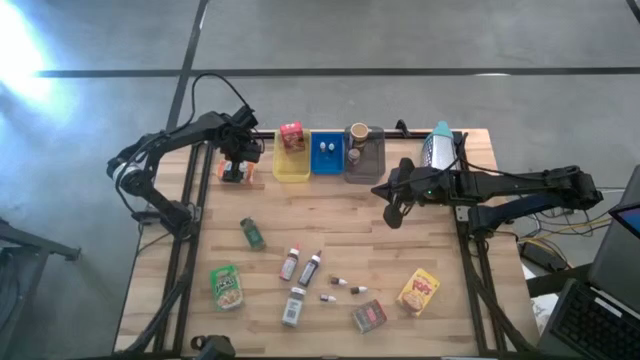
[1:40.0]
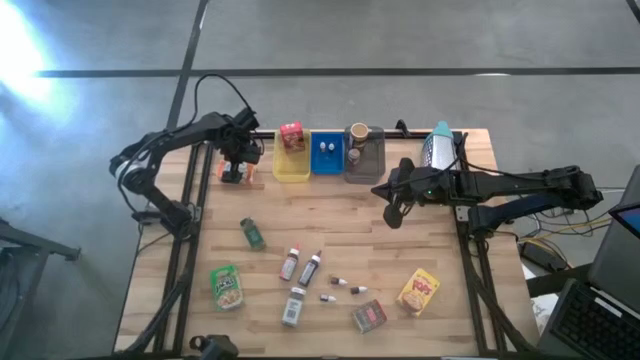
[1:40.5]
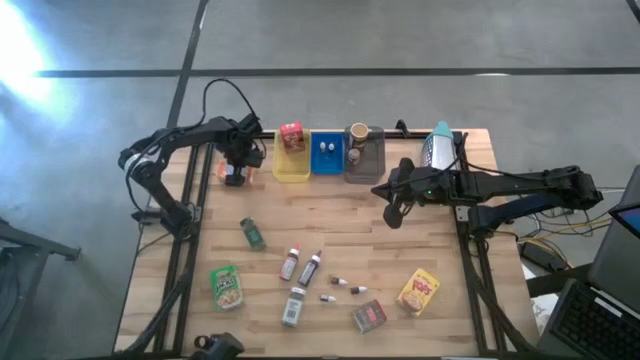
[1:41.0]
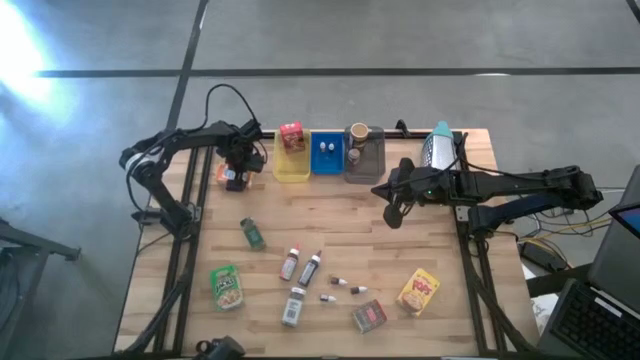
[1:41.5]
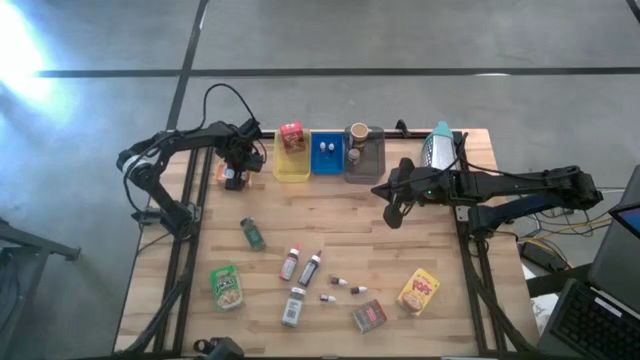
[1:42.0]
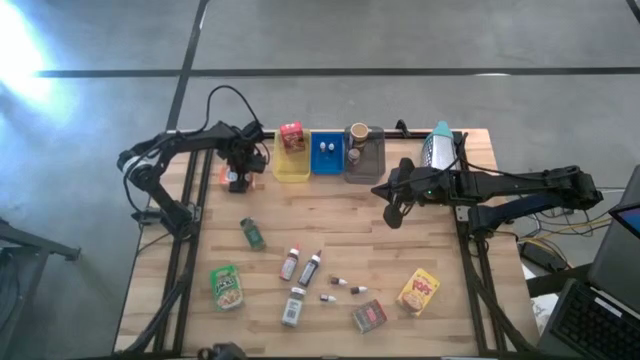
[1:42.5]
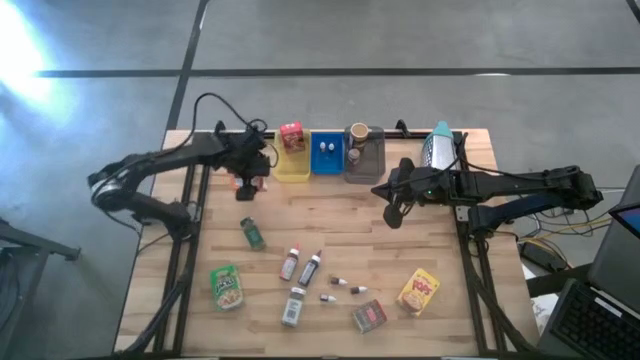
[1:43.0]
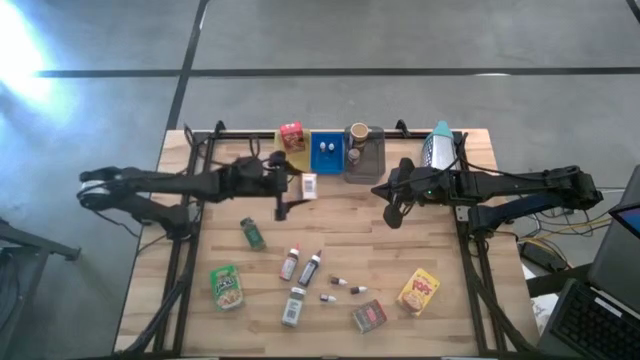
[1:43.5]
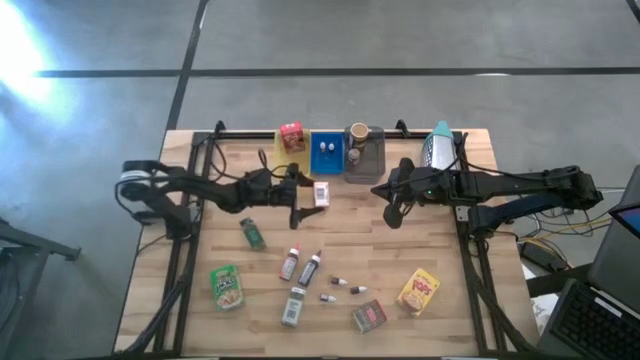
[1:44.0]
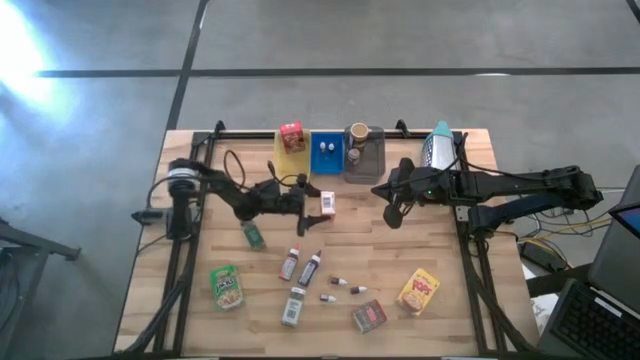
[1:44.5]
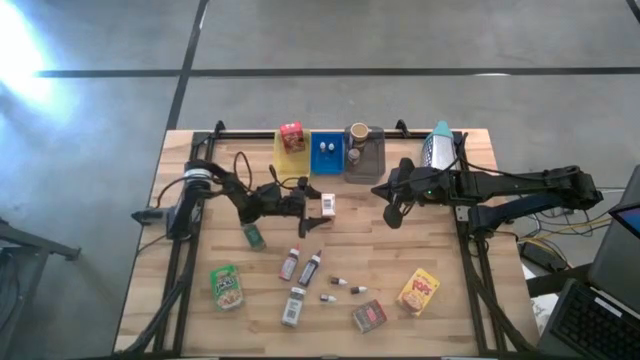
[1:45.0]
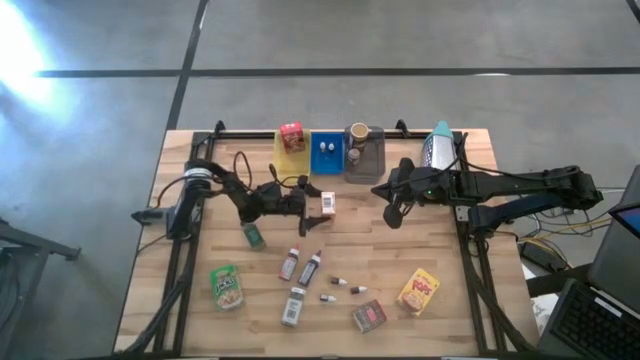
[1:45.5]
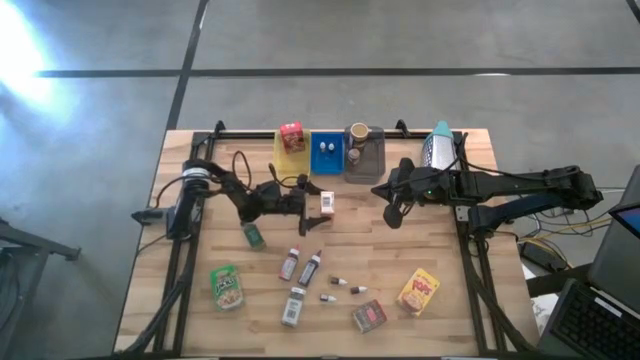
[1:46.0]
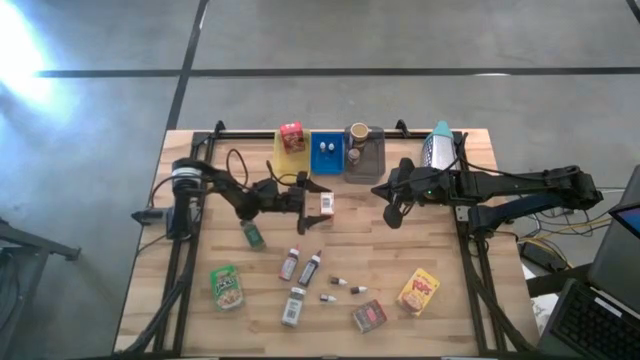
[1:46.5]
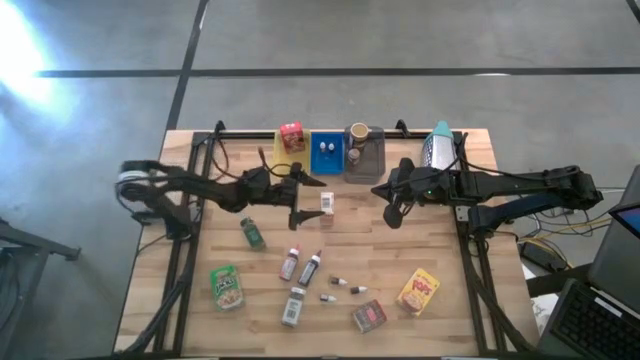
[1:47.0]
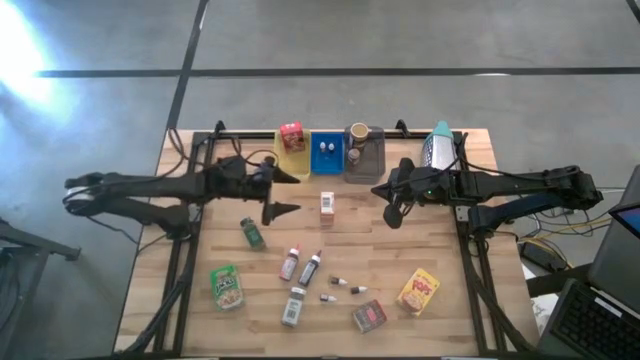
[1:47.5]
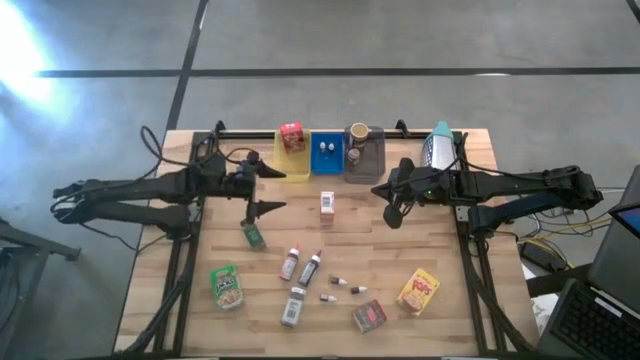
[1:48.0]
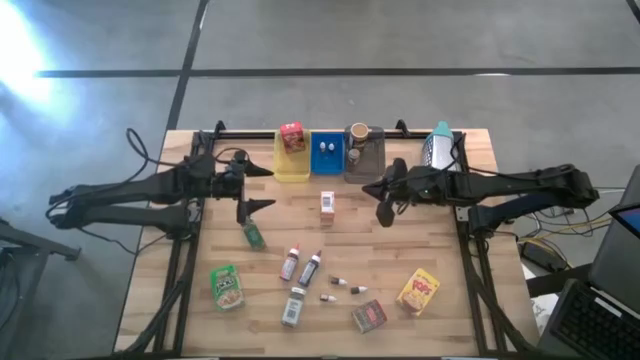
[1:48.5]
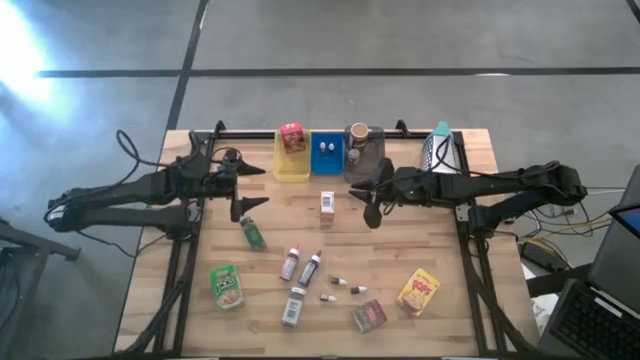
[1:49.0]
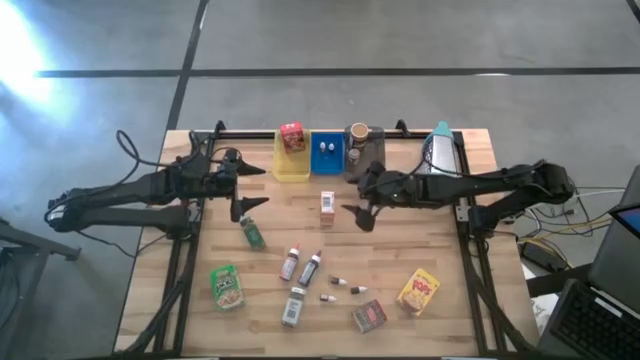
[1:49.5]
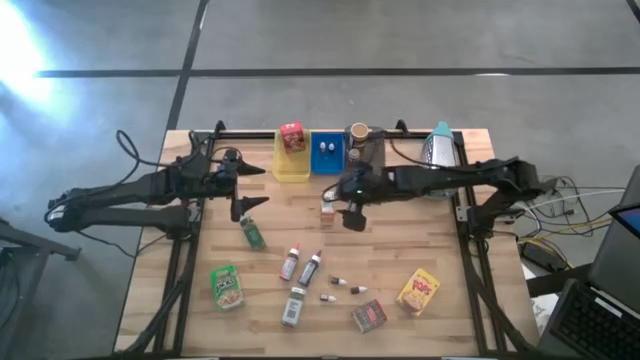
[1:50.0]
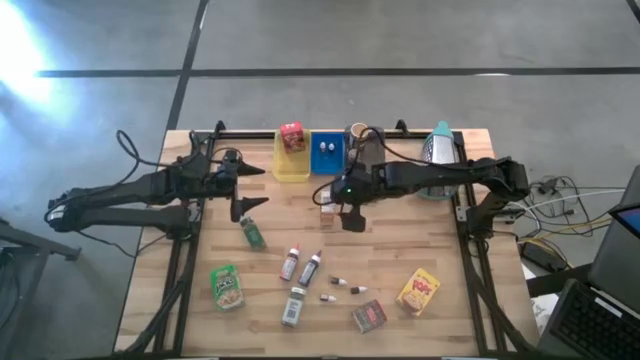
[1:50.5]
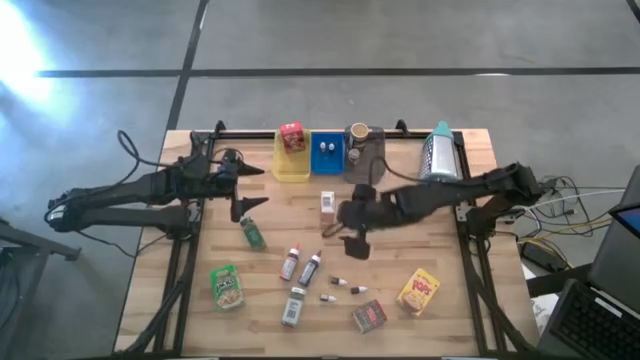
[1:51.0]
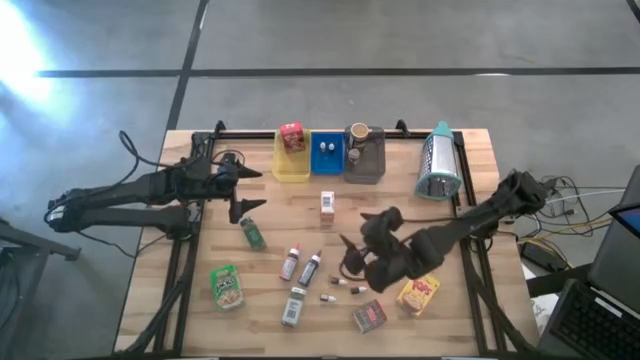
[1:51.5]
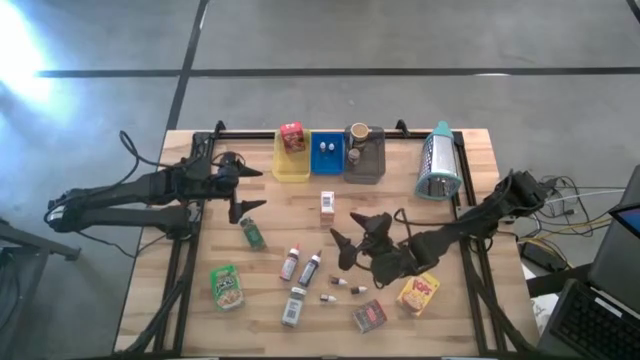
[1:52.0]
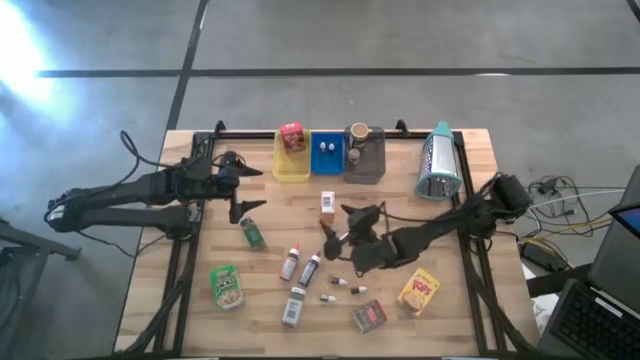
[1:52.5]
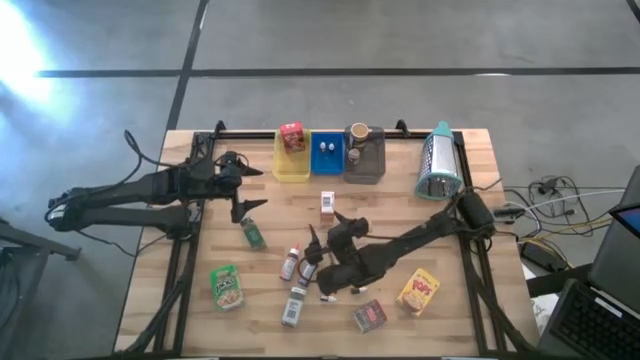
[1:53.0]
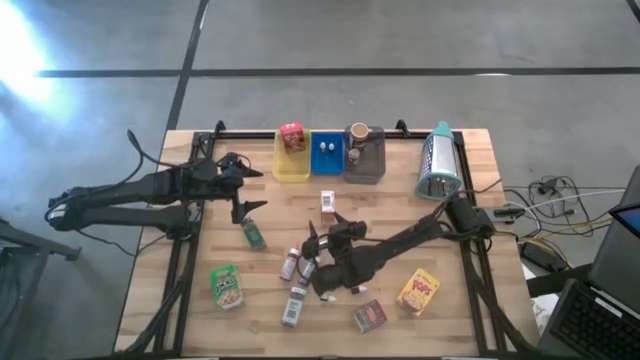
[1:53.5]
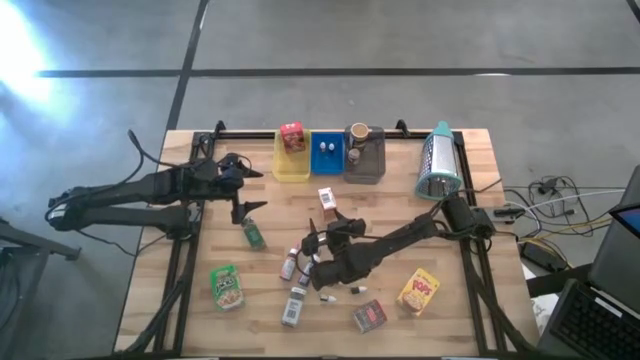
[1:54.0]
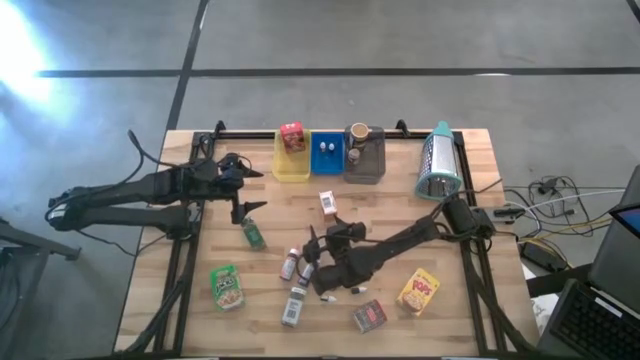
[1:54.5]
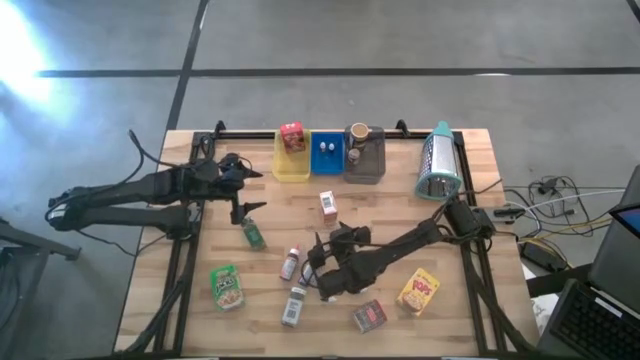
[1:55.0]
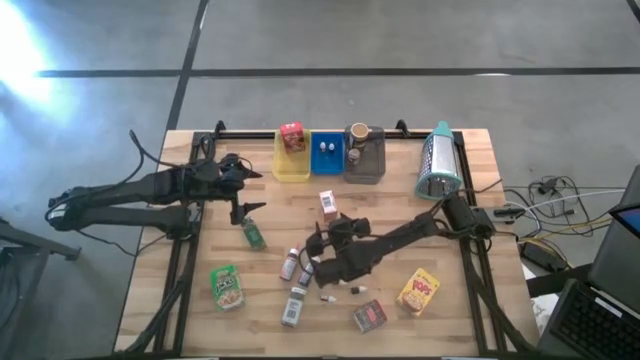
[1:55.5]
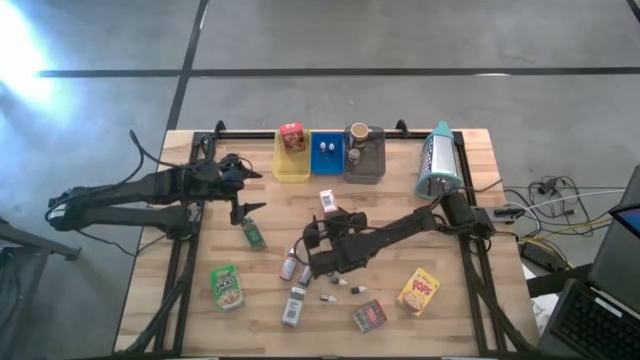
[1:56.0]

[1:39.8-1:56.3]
Task: Pick & Place Kitchen Items
Put the orange cereal box into the yellow bin

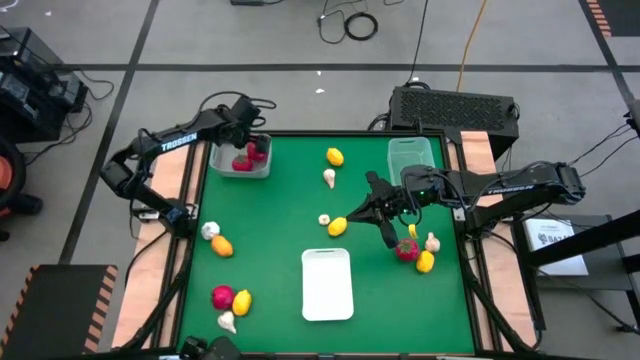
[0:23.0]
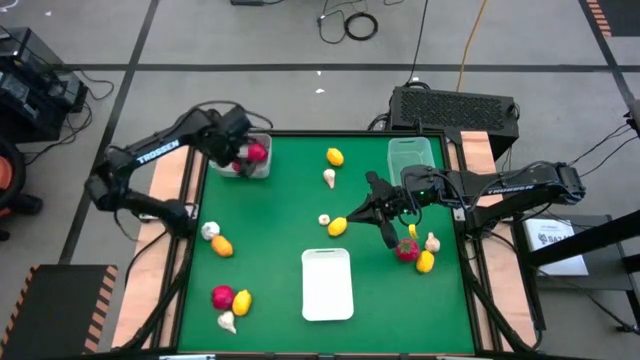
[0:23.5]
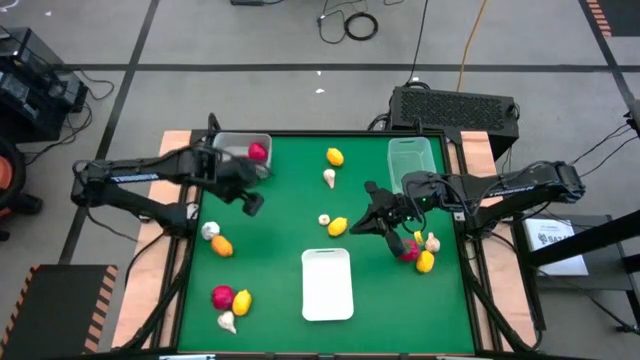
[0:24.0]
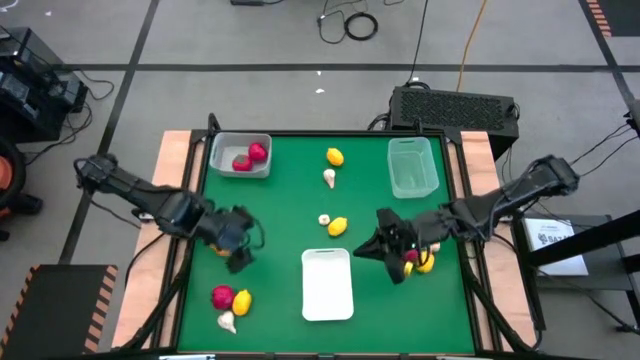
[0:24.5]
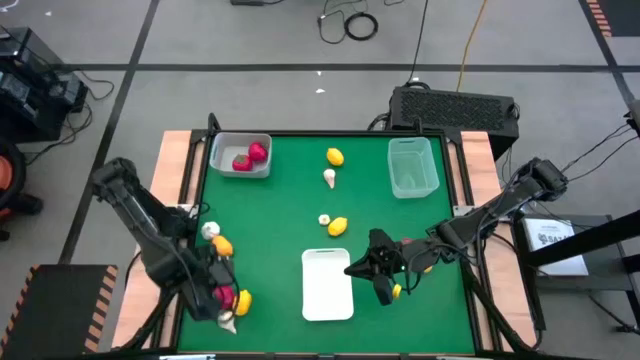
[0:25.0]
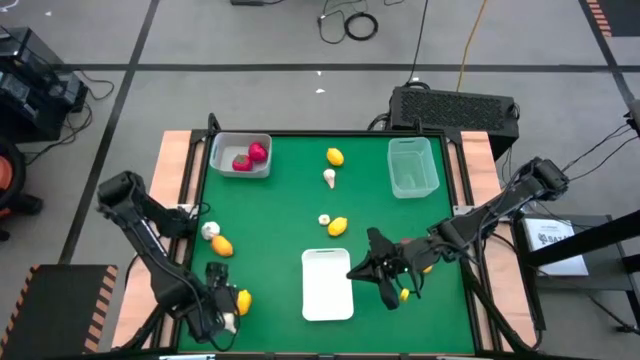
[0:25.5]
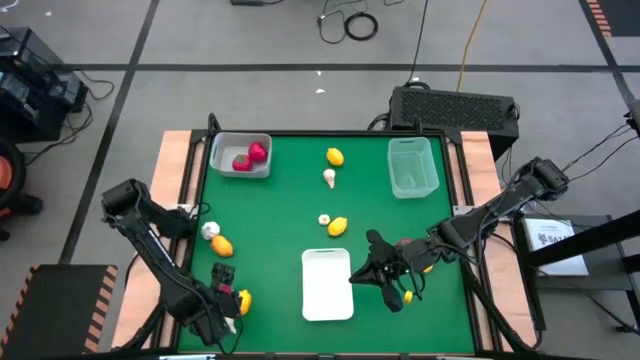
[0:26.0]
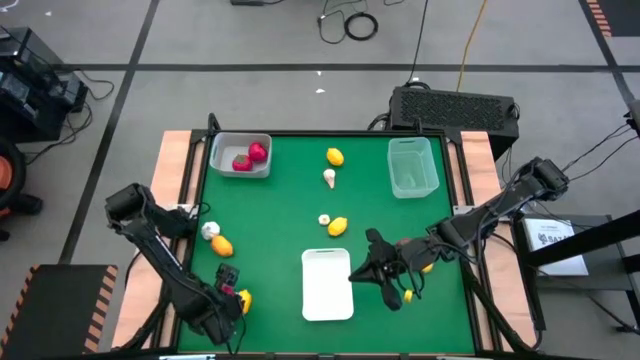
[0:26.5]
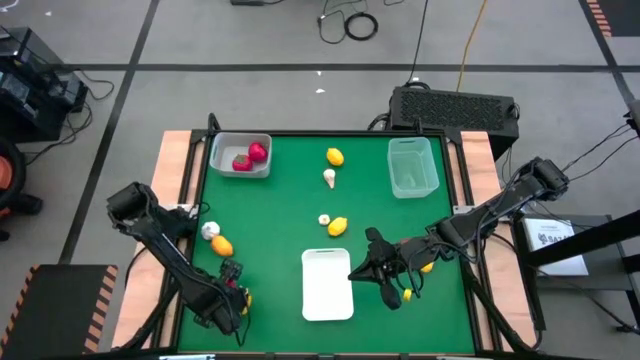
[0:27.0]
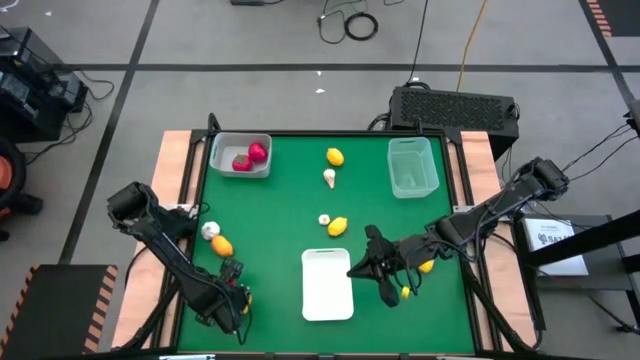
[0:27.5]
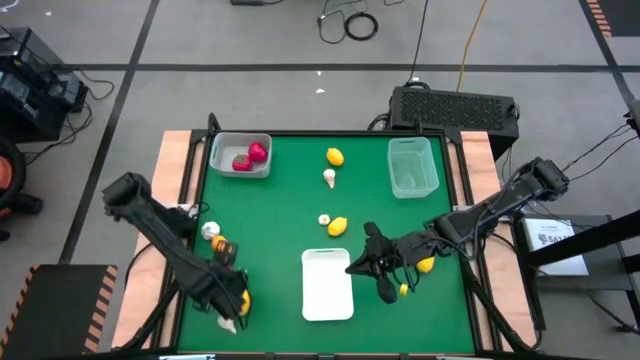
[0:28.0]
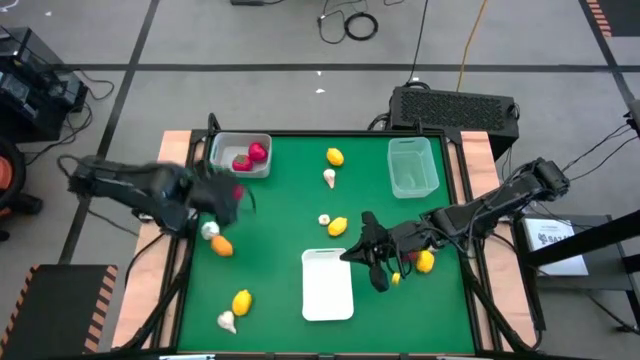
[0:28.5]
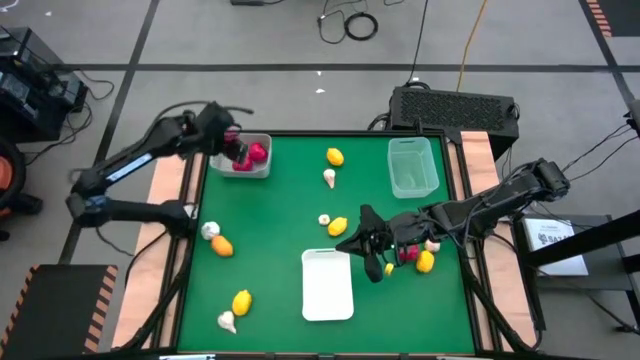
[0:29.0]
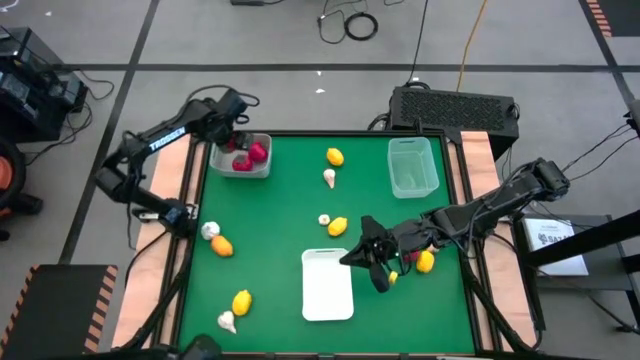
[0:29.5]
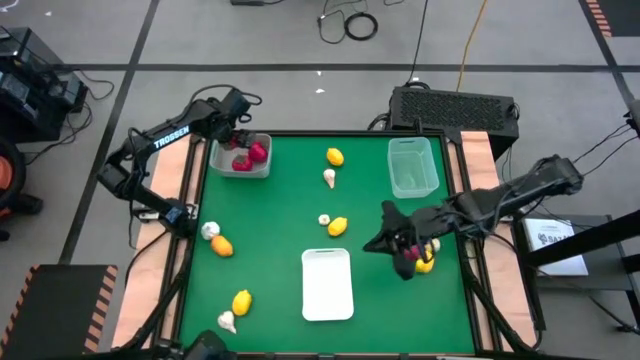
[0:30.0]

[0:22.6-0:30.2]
Task: Sort produce into baskets
Put the left tomato into the gray bin
